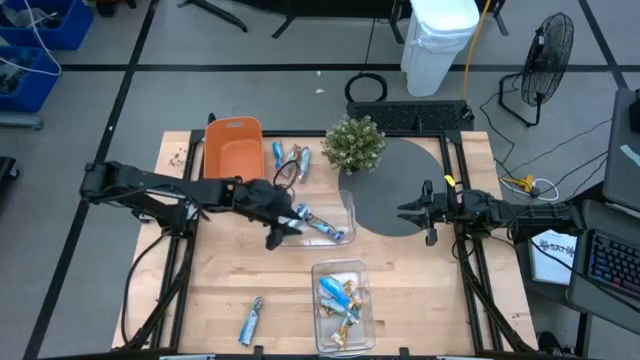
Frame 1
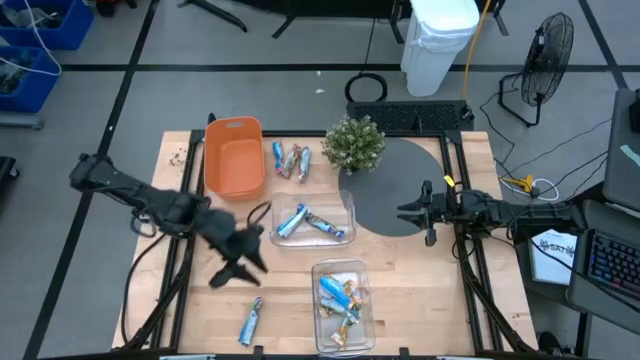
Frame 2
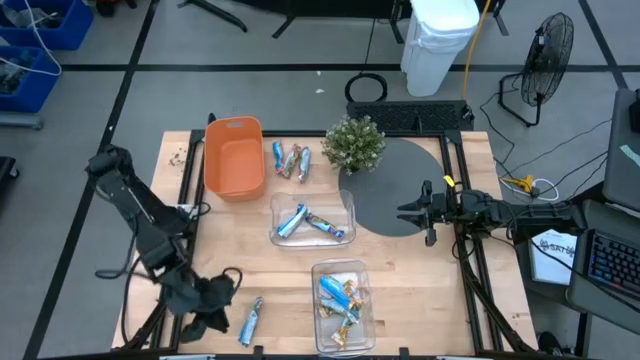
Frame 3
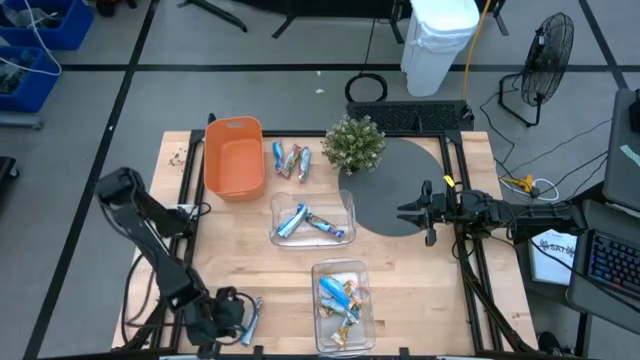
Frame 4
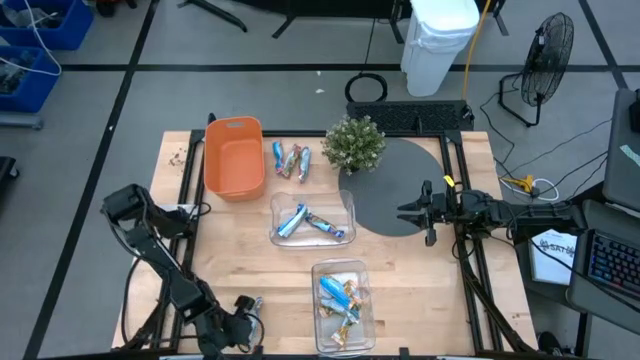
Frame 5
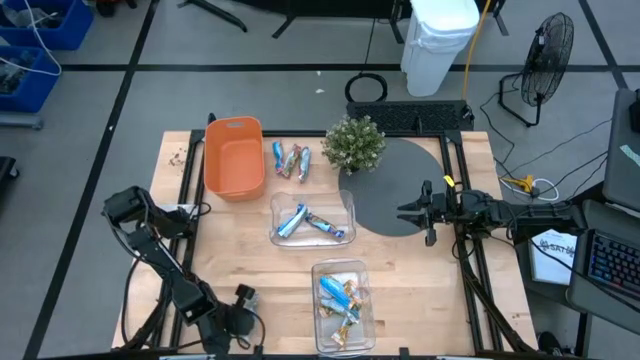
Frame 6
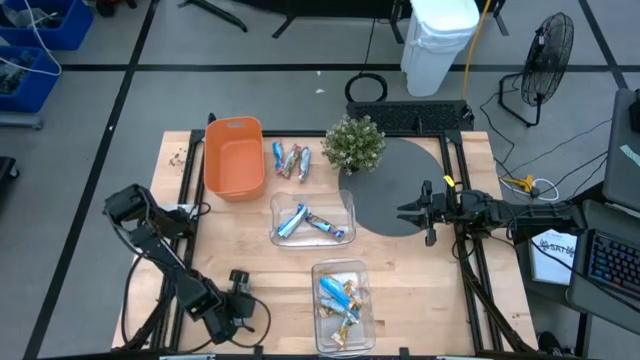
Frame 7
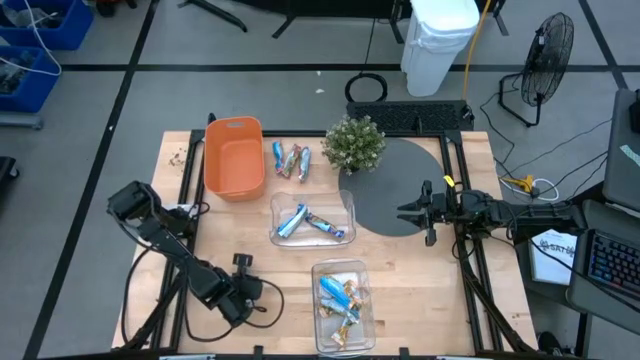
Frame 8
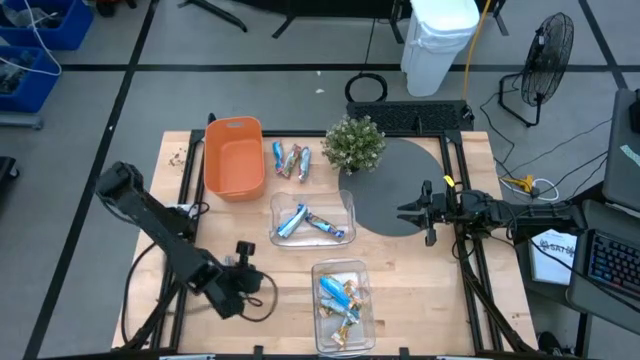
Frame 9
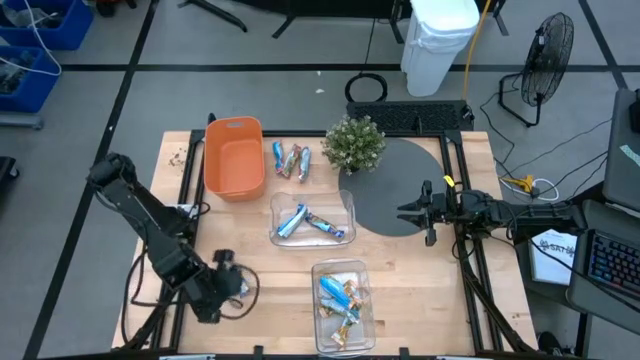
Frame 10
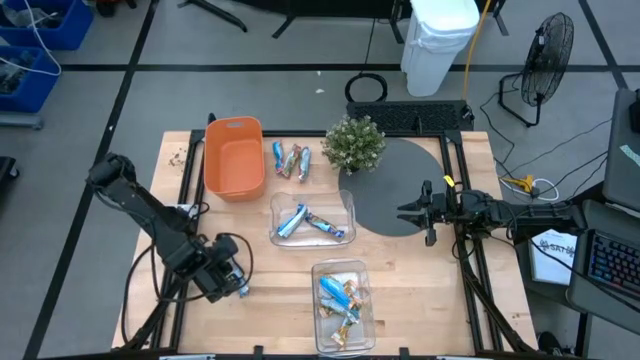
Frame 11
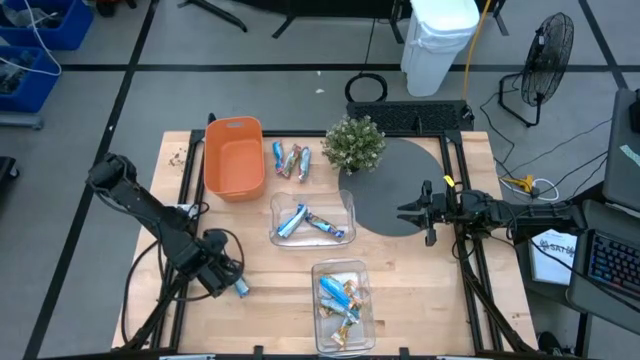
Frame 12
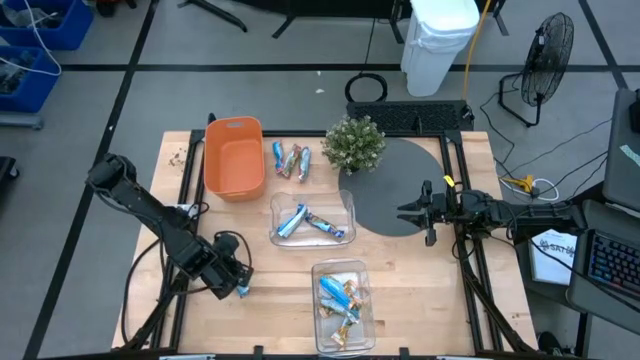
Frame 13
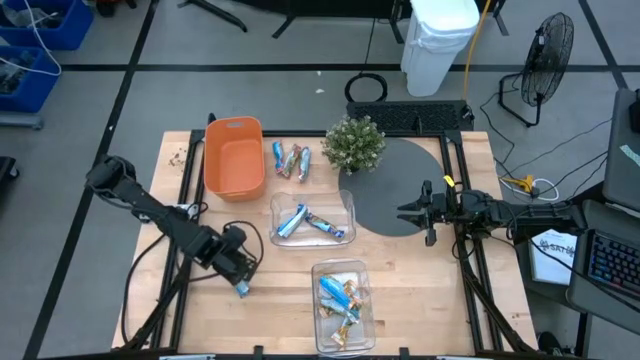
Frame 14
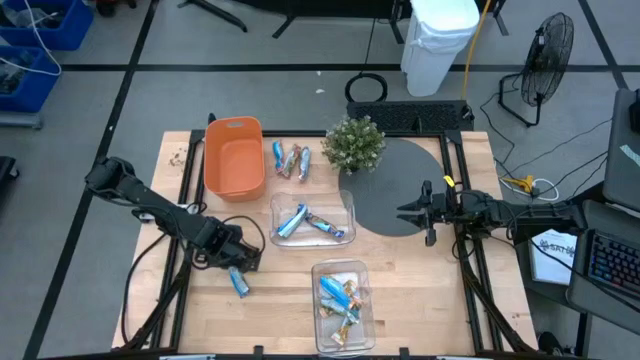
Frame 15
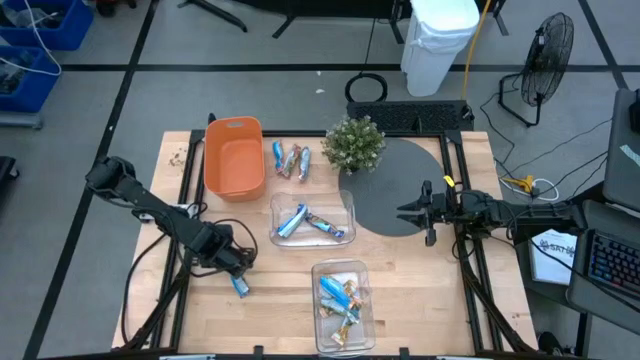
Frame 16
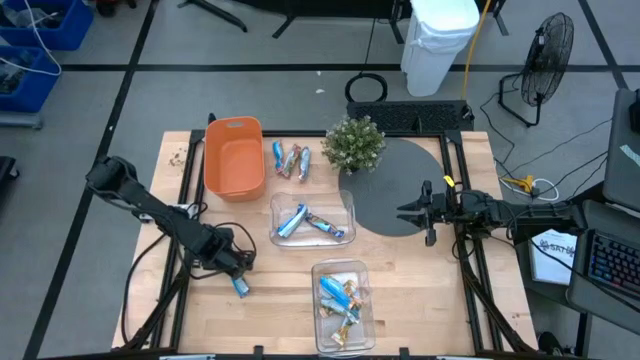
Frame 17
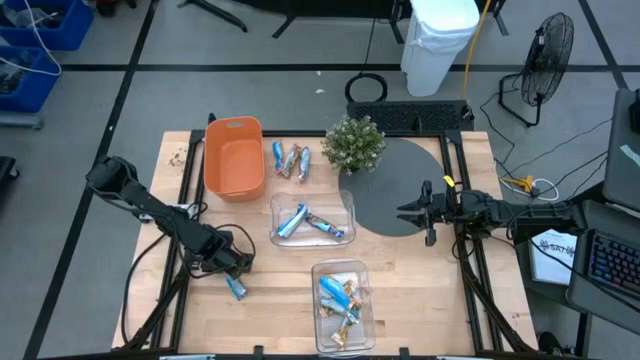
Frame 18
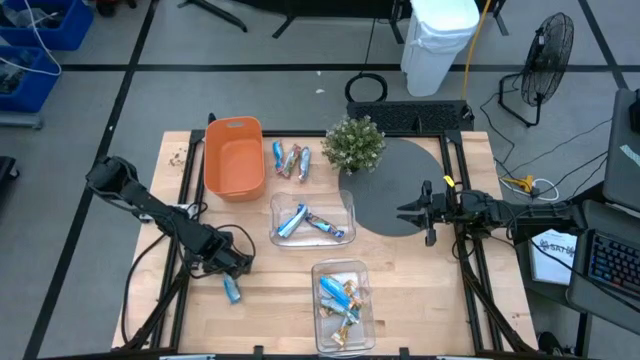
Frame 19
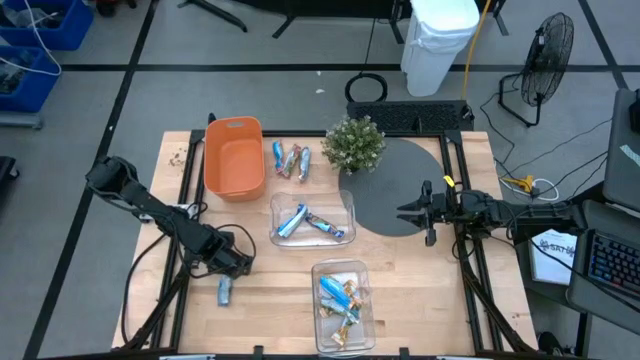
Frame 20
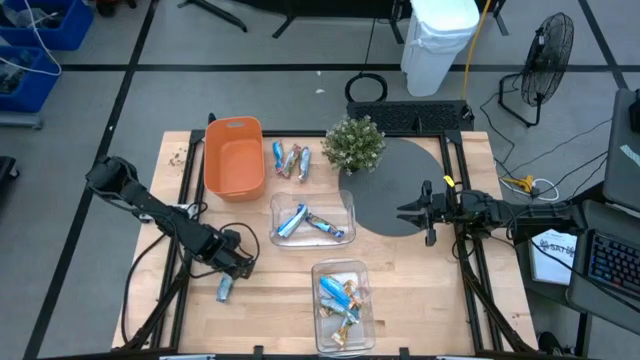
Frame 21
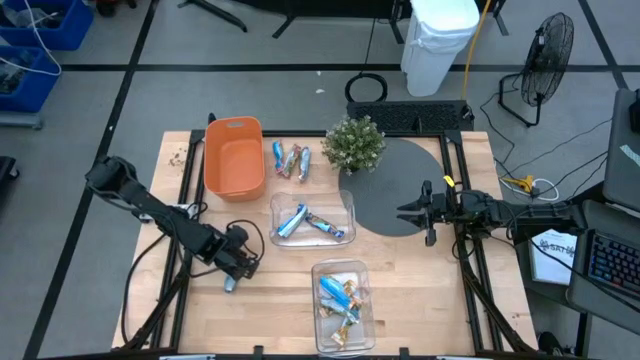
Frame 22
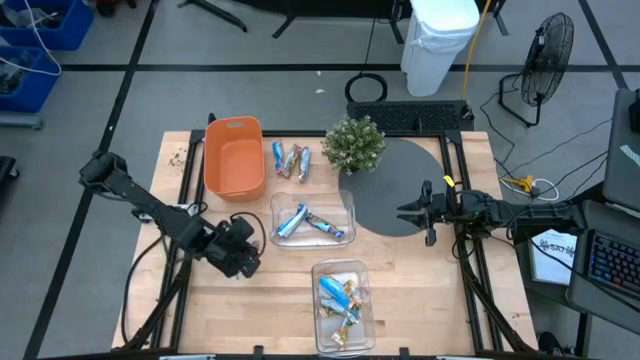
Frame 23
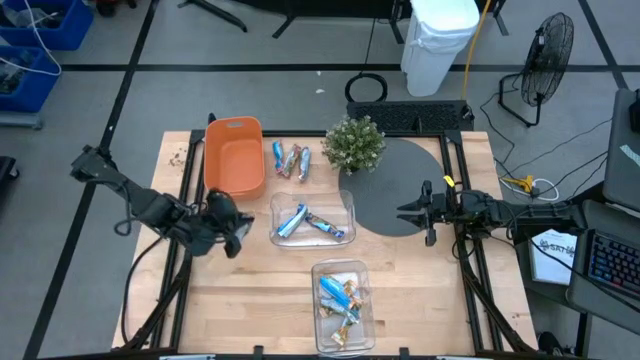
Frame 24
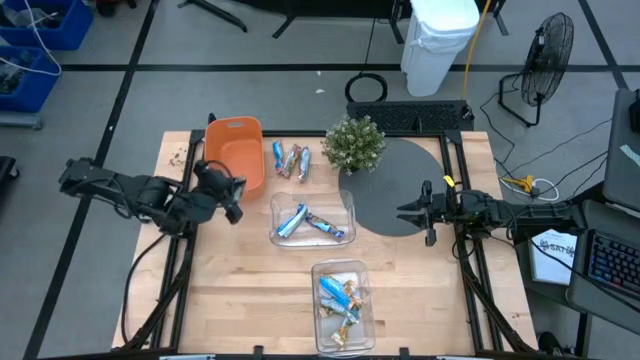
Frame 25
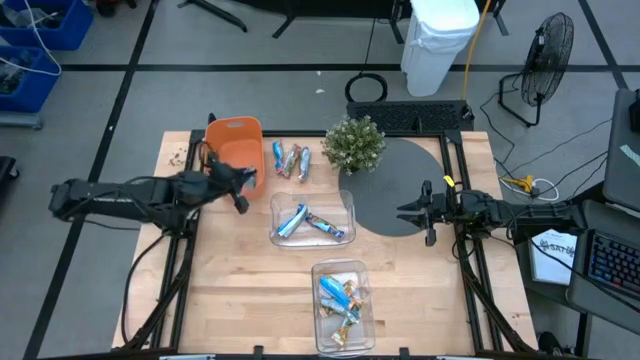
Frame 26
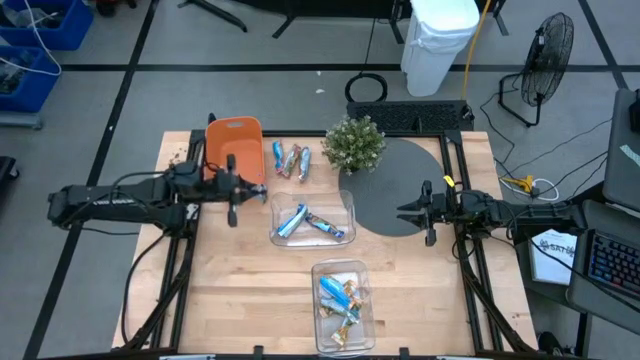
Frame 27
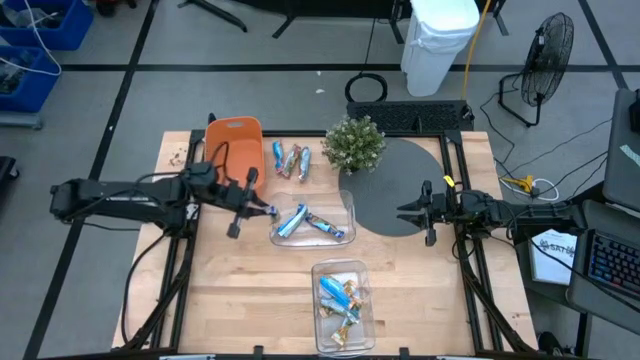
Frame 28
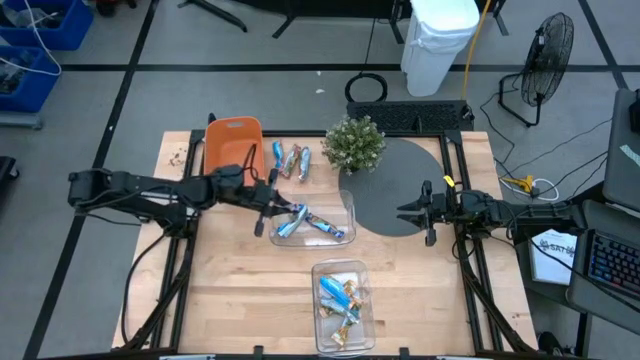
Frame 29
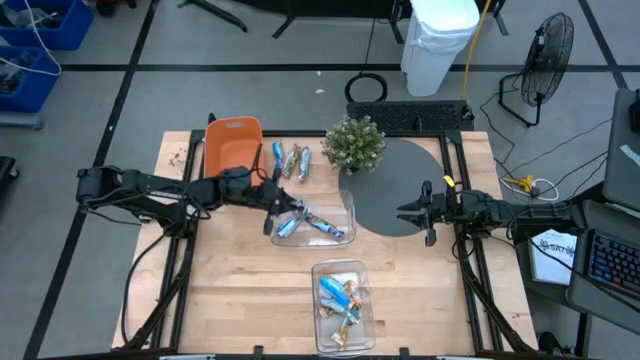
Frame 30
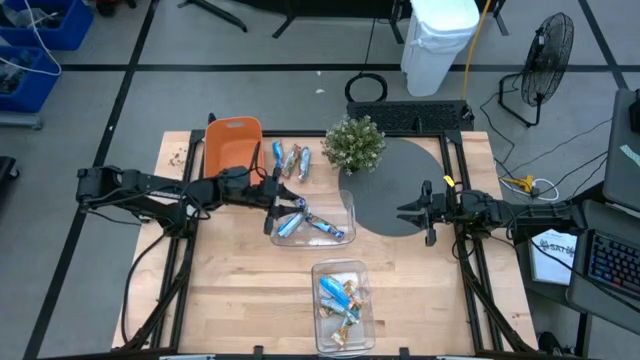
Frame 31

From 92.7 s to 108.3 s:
Task: Pick and place Granola Bars by type
Put the purple granola bar into the top transparent bin

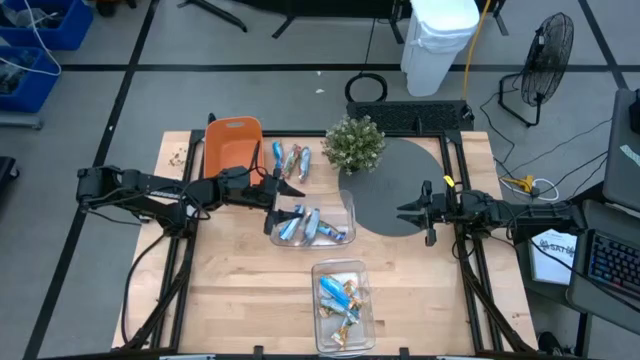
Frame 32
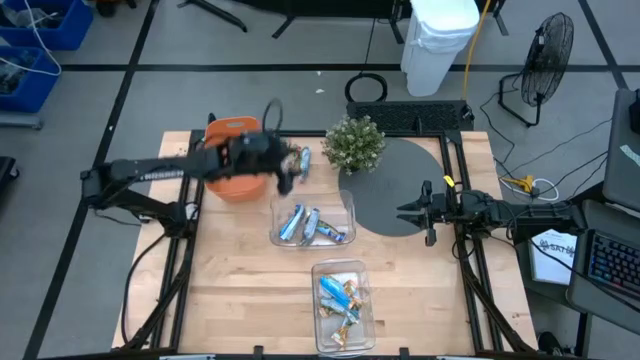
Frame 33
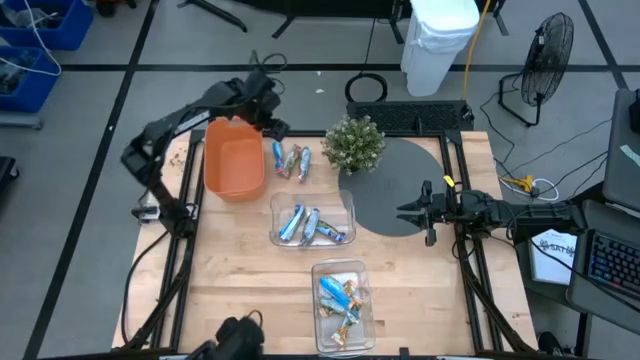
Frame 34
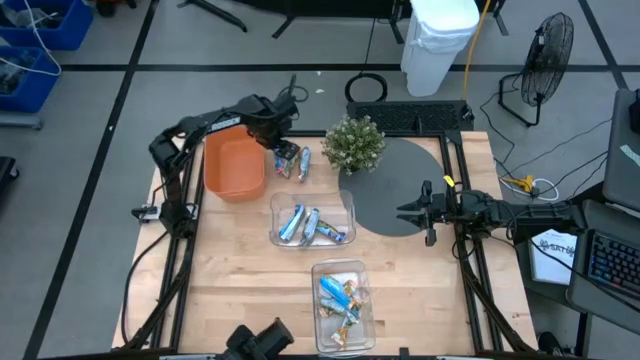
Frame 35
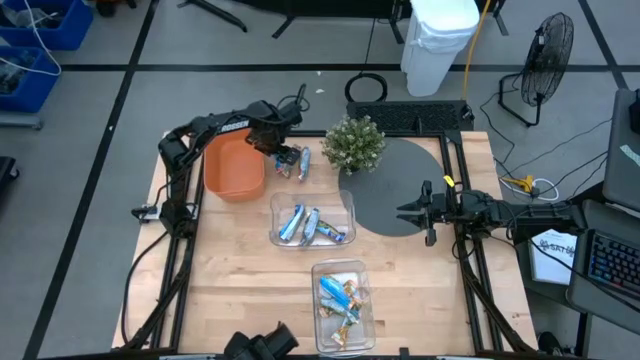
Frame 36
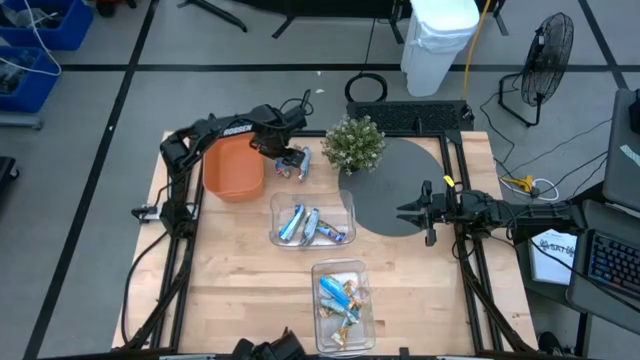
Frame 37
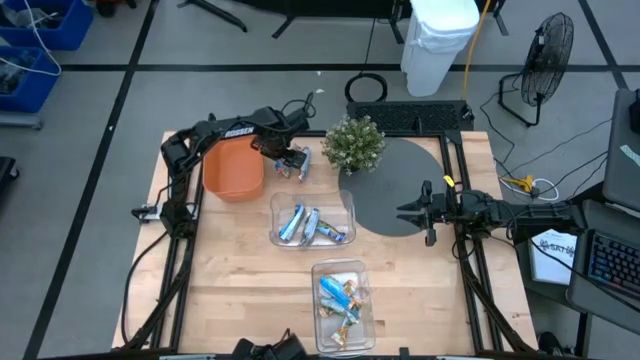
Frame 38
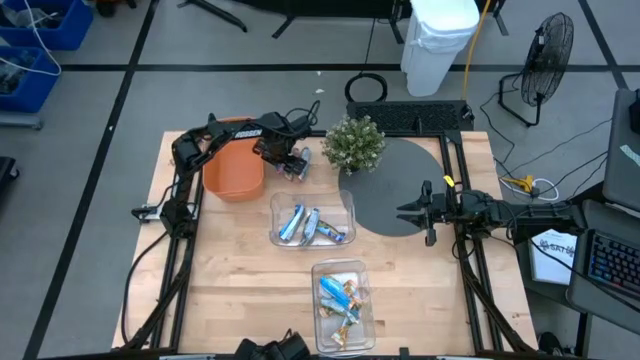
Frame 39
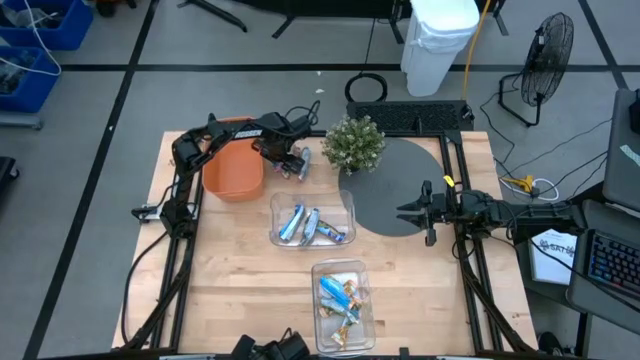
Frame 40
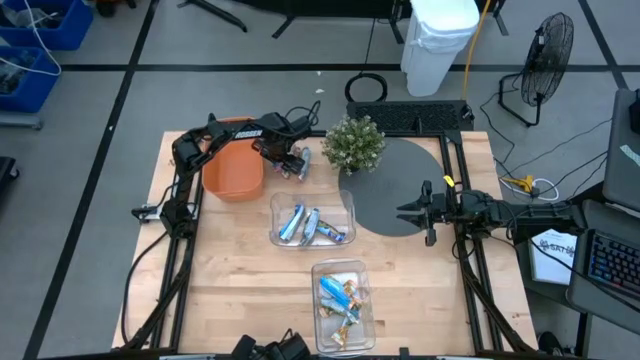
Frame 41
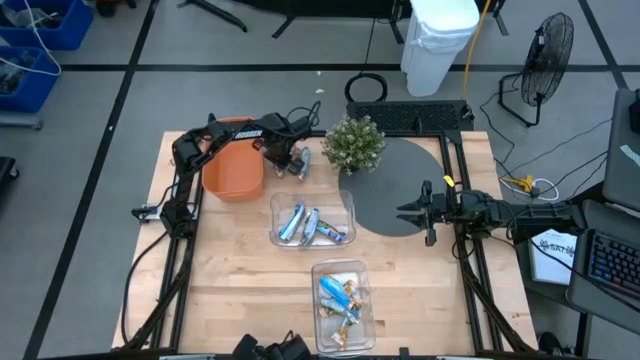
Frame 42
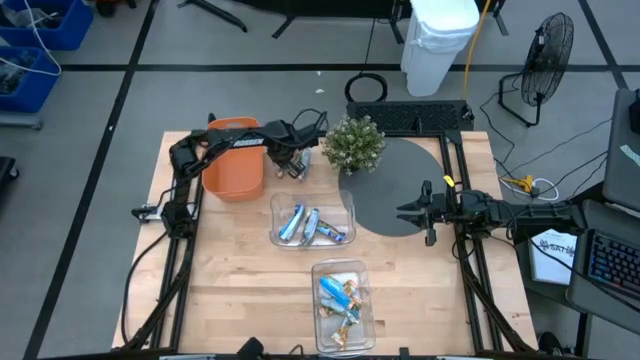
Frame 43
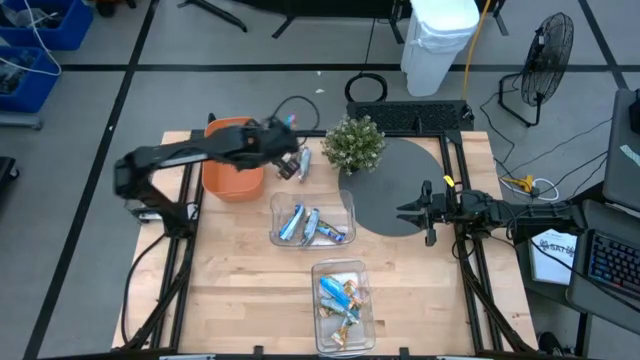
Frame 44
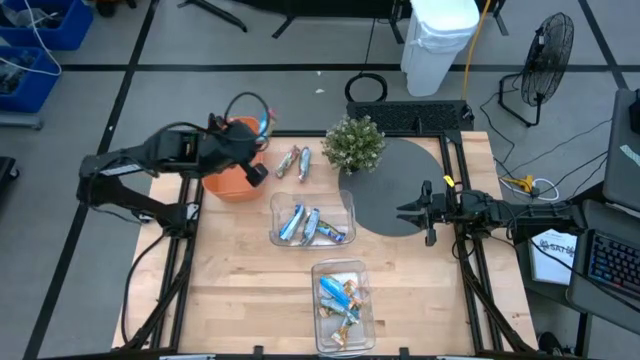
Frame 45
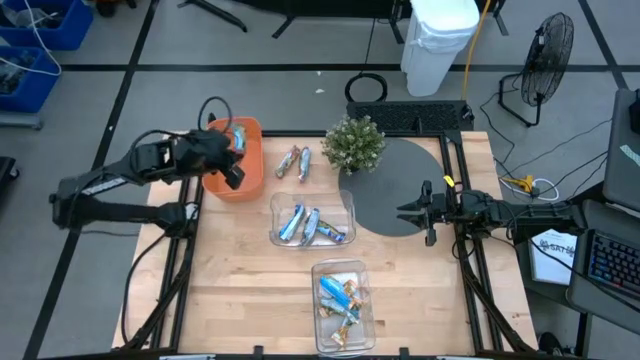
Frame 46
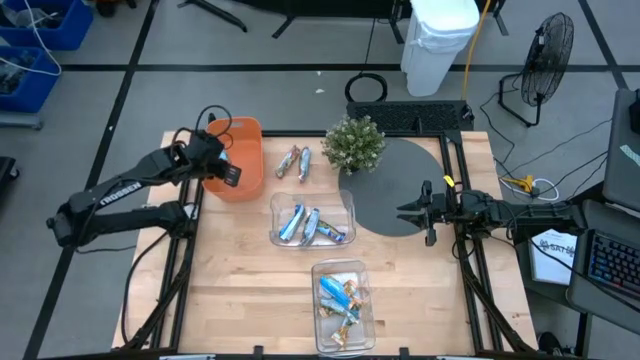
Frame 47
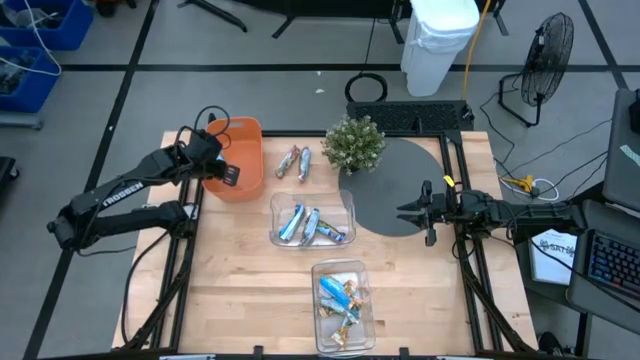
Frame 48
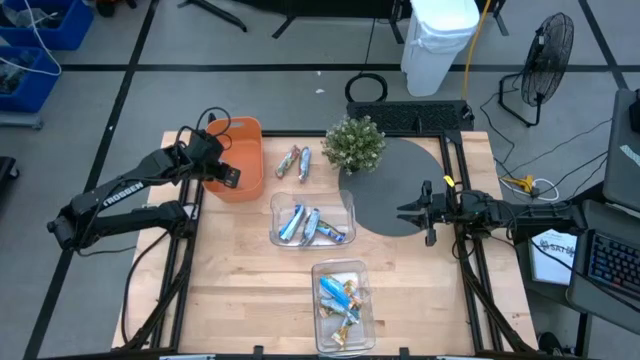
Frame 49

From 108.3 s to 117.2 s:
Put the red granola bar into the orange bin
